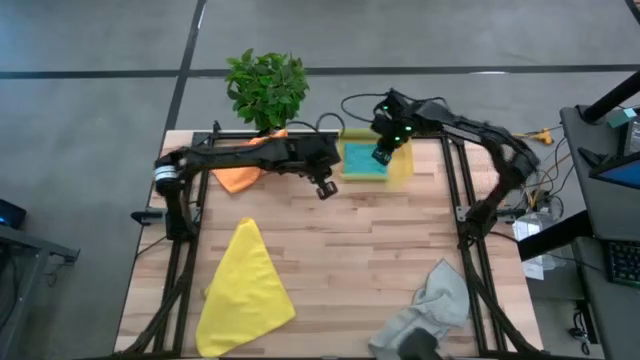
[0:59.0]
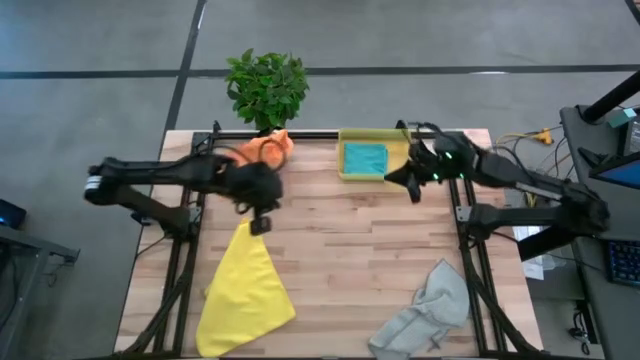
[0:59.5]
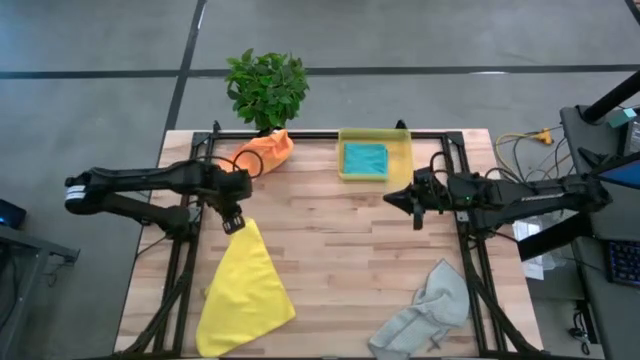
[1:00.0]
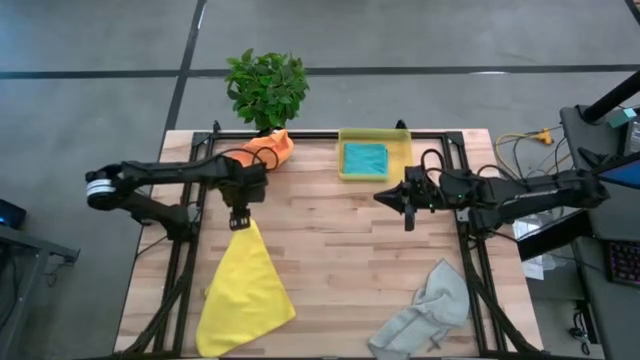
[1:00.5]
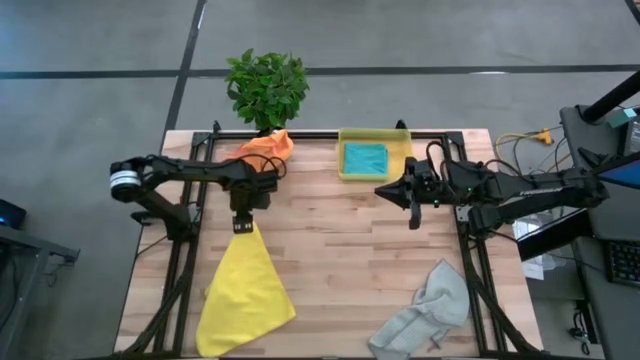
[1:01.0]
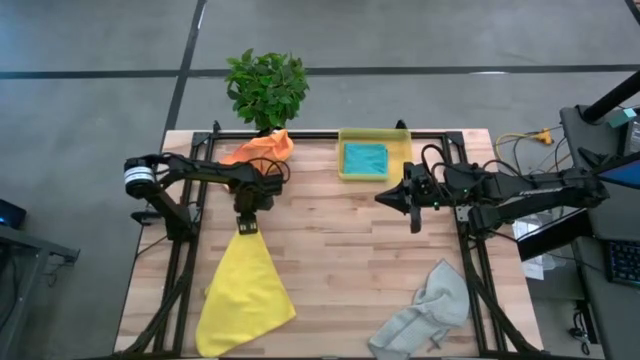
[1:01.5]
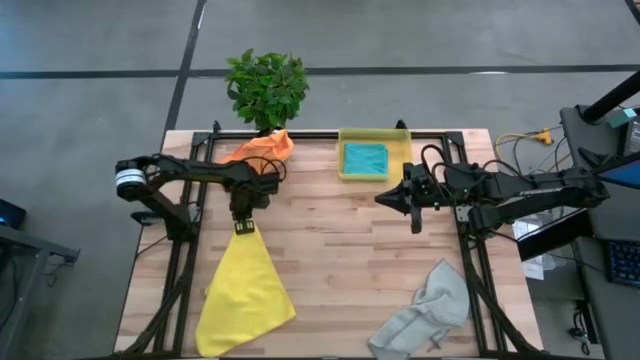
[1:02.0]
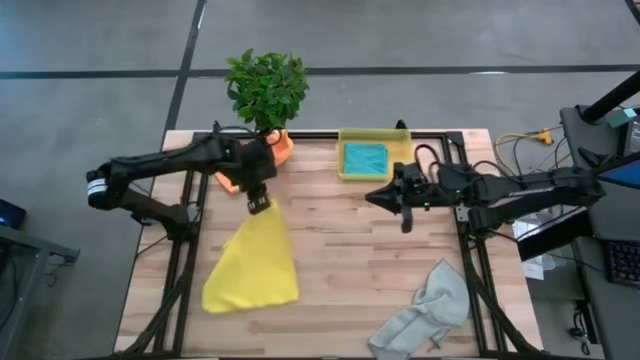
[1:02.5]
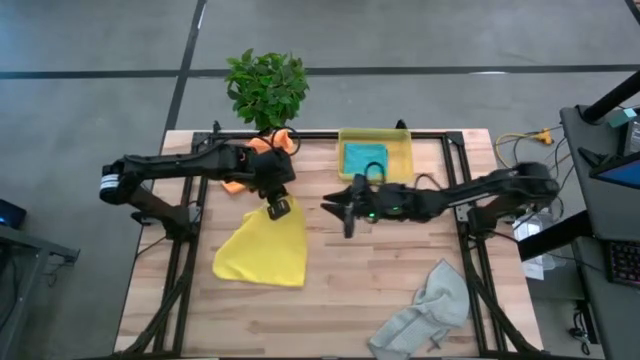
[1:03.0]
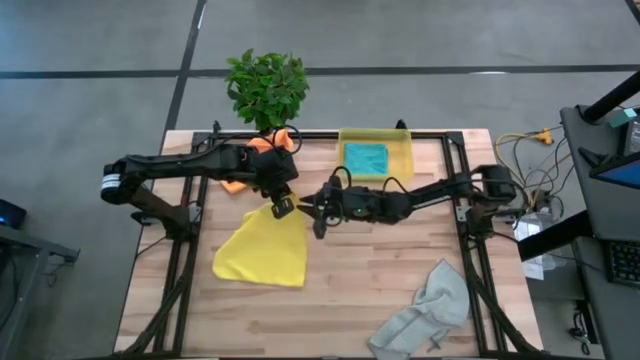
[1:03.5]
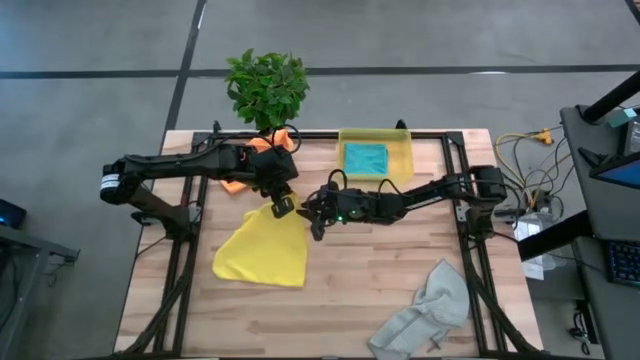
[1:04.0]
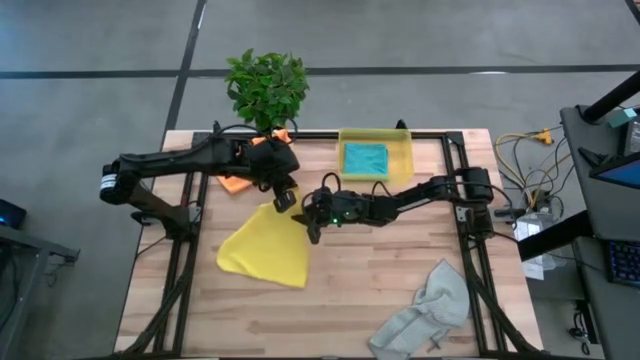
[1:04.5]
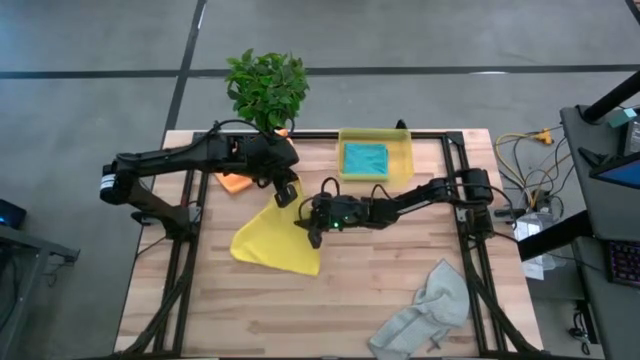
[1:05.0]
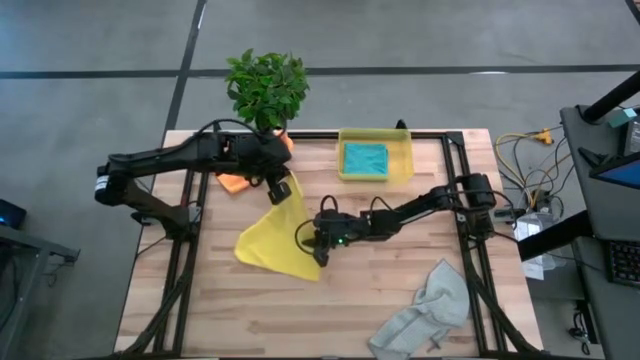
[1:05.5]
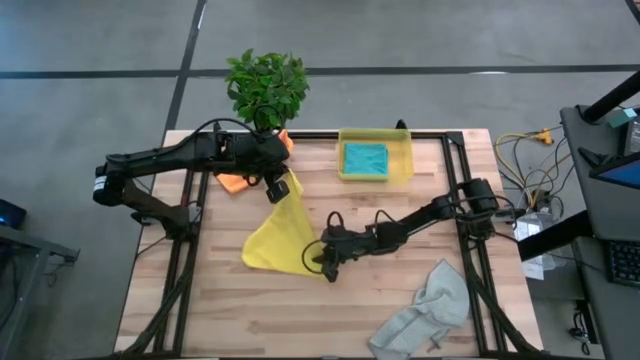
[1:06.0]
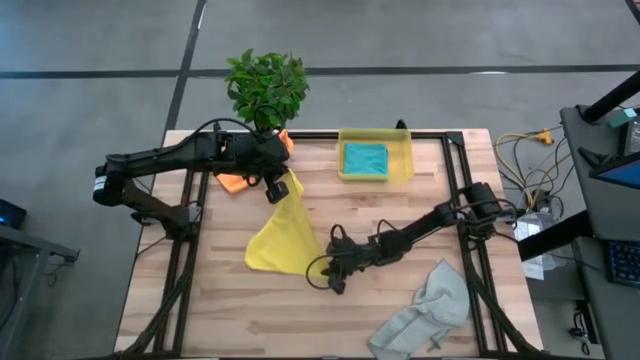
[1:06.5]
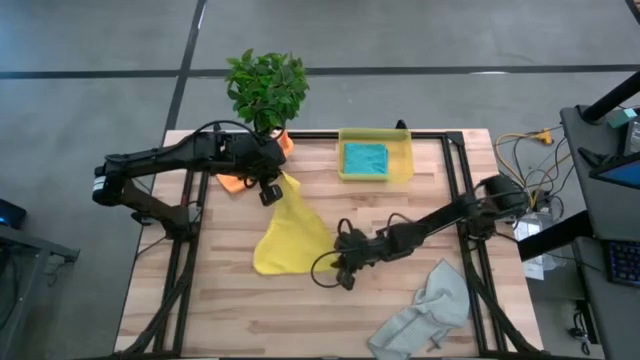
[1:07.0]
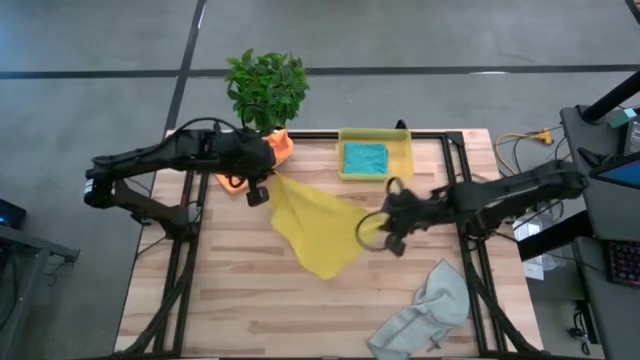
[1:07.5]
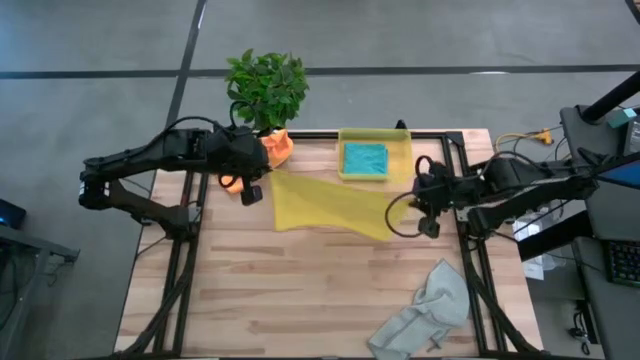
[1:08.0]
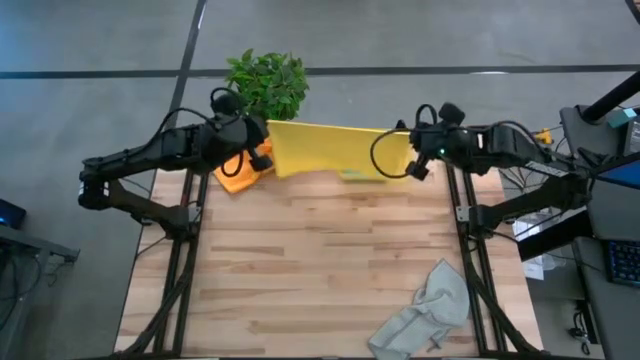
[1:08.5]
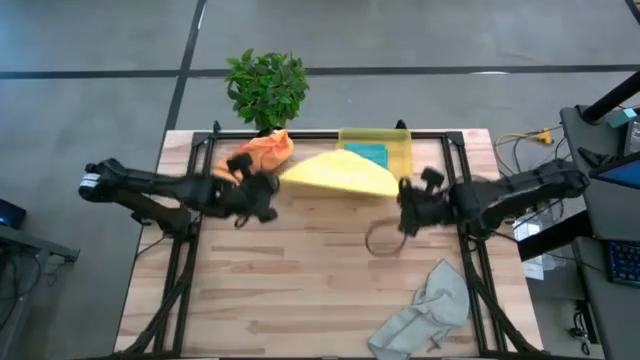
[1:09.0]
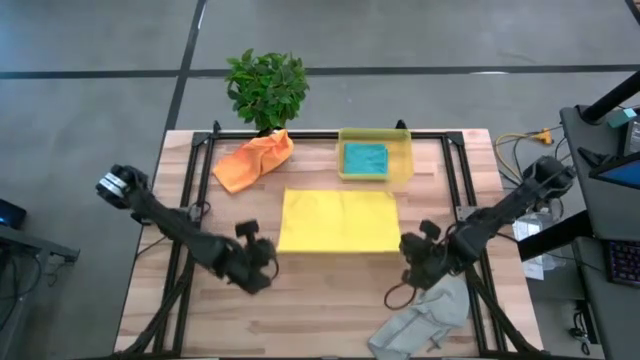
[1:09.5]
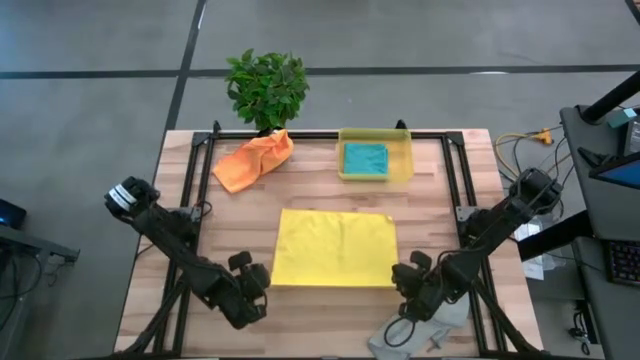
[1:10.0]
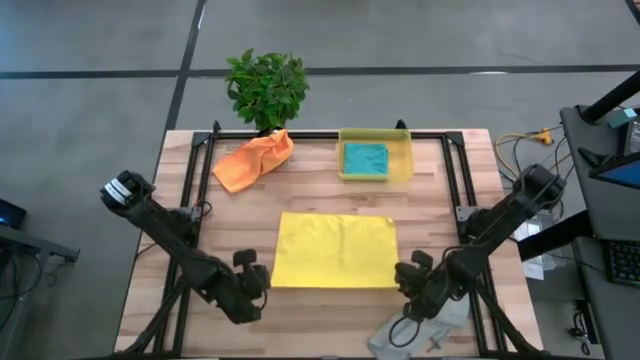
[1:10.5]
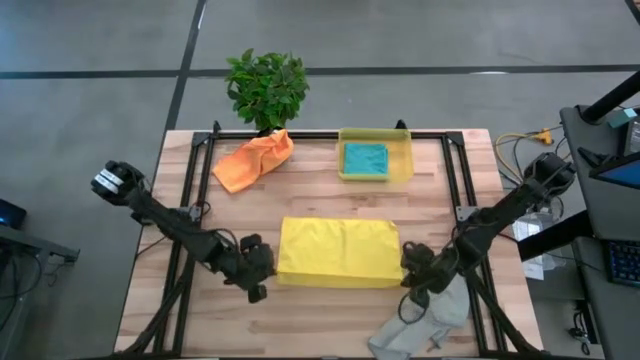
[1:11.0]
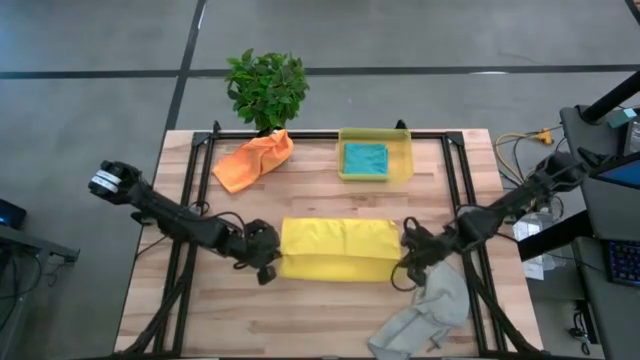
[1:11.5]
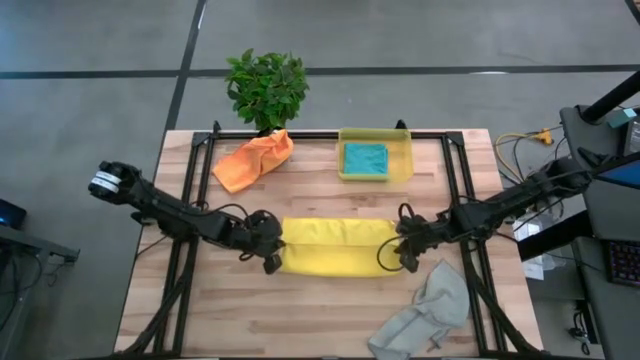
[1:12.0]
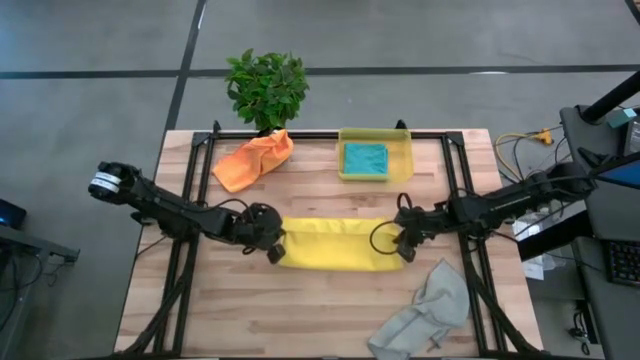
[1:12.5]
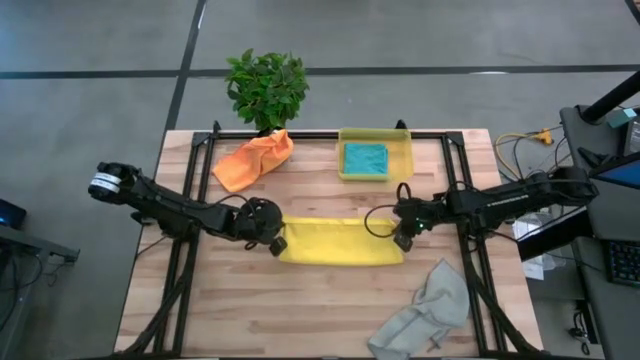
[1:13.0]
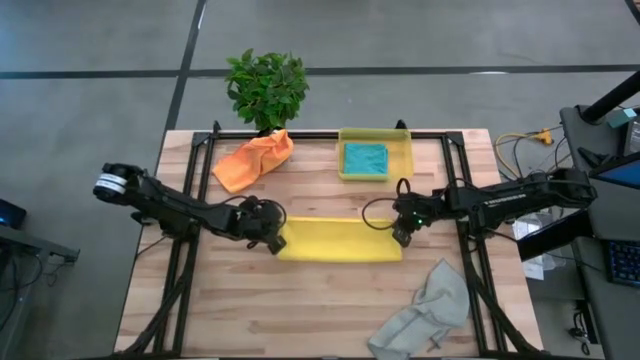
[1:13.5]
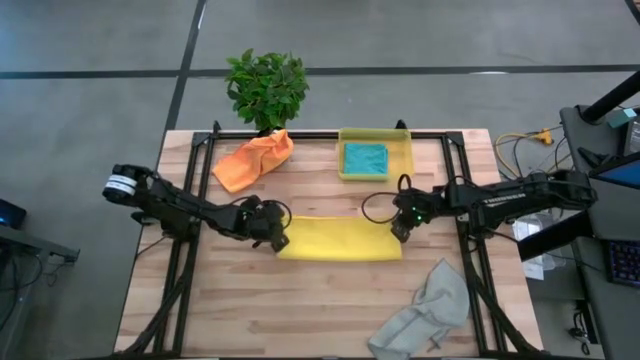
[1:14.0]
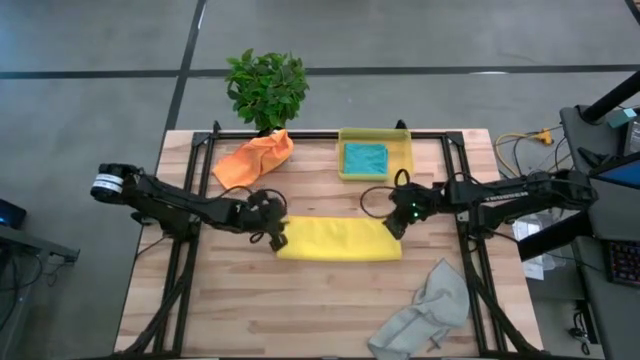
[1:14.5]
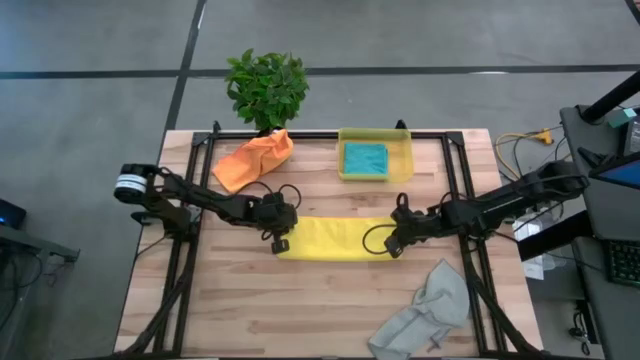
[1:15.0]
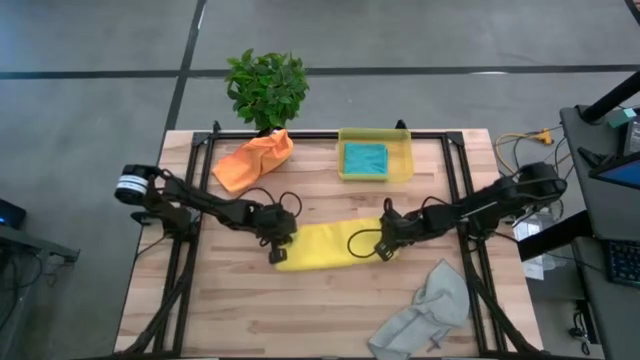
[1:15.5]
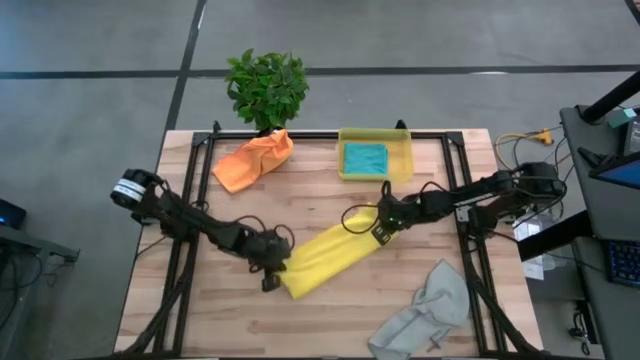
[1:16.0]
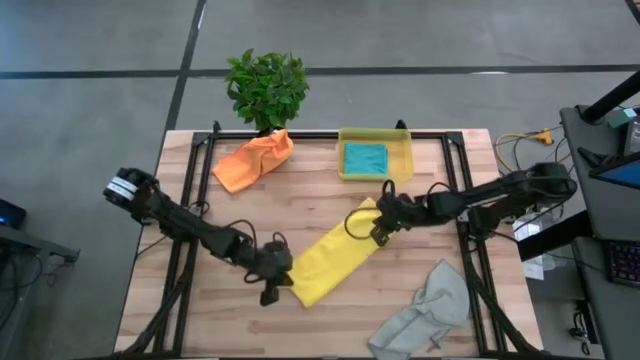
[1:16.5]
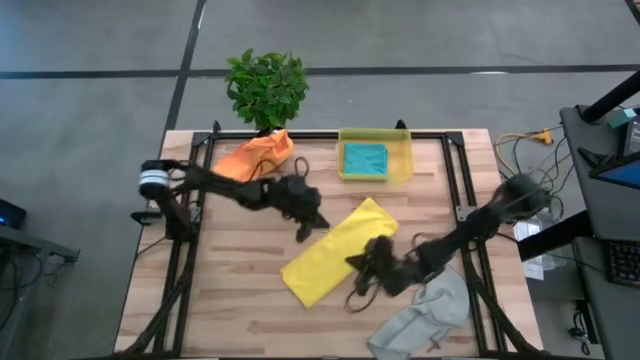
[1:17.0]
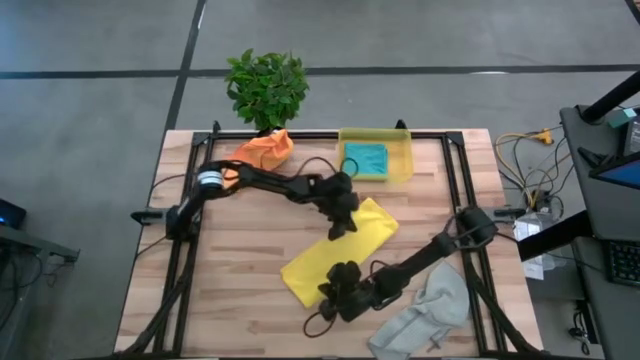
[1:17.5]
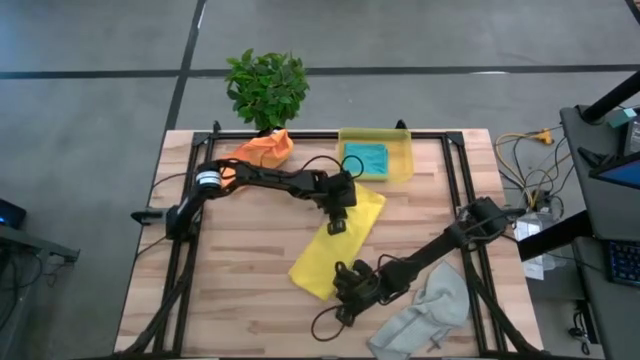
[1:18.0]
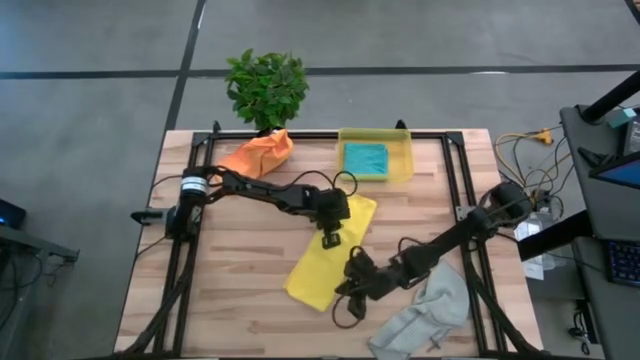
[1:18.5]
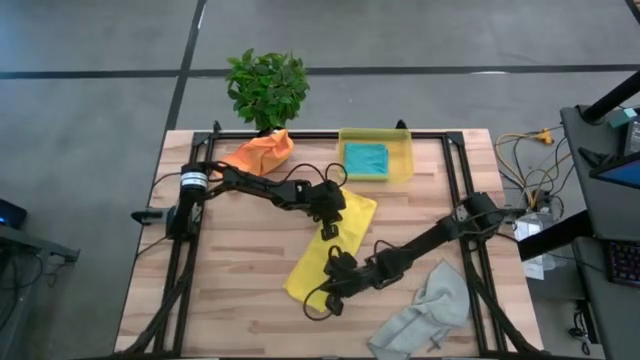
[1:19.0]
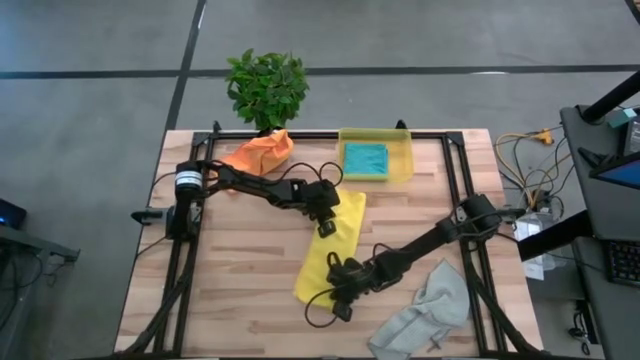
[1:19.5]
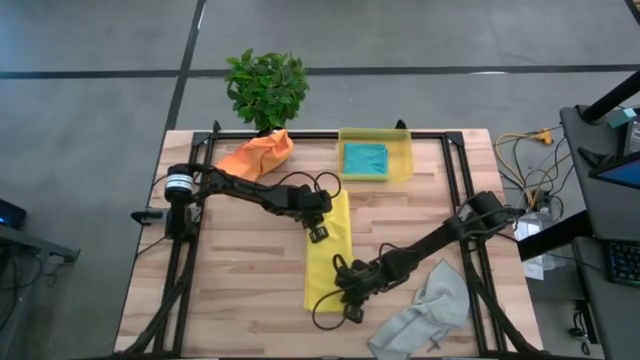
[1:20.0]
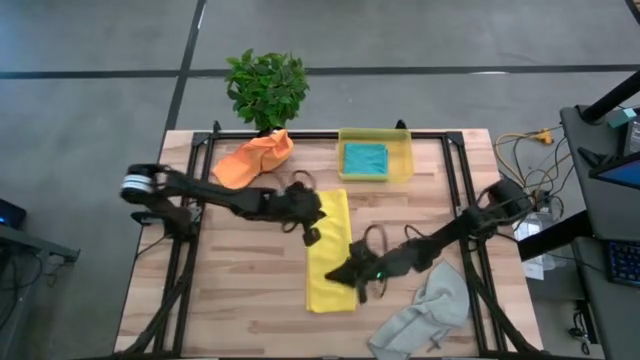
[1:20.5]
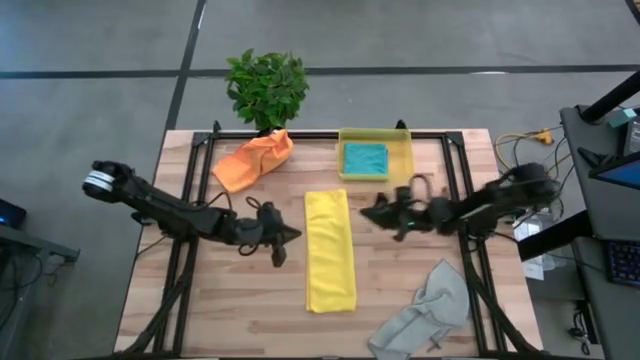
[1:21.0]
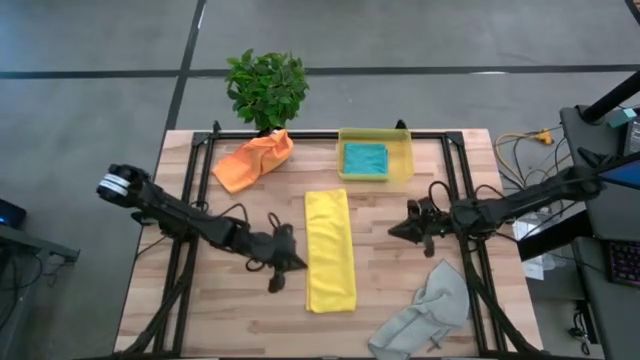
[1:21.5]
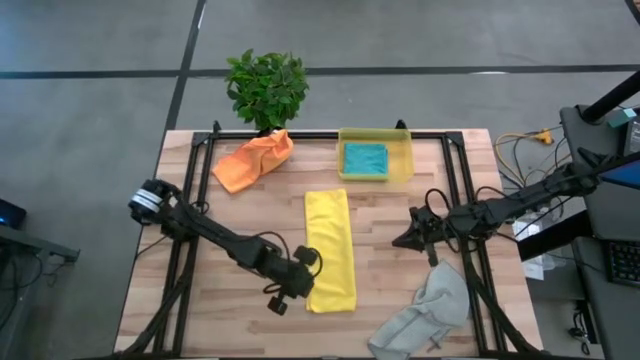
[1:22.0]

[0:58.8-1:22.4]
Task: Fold microfiber towels
Fold the yellow microfiber towel
